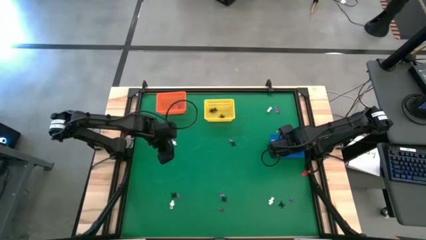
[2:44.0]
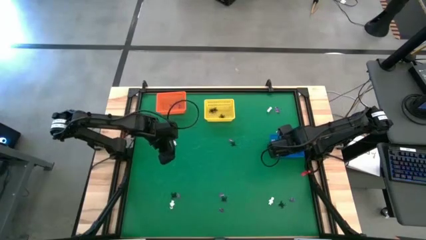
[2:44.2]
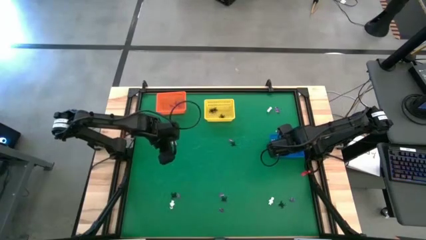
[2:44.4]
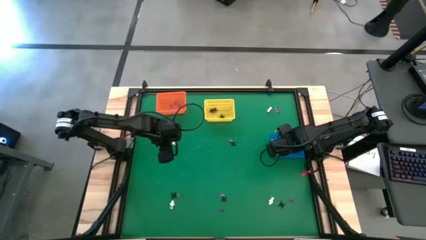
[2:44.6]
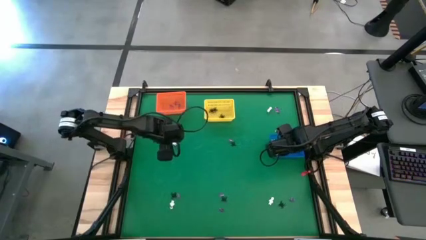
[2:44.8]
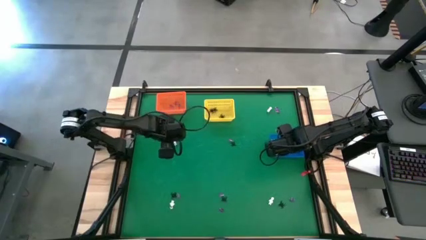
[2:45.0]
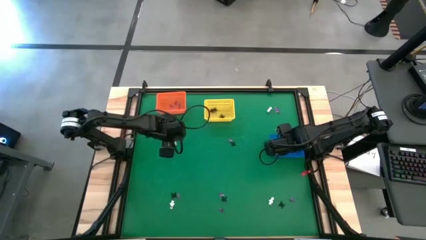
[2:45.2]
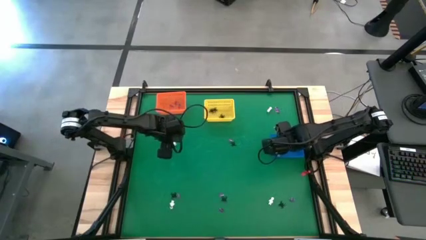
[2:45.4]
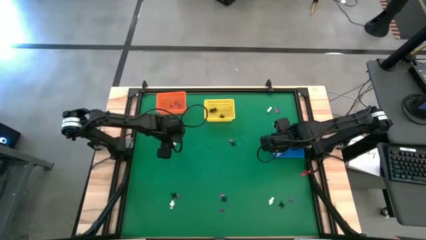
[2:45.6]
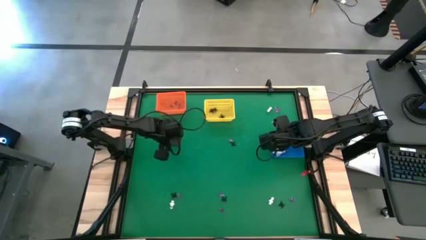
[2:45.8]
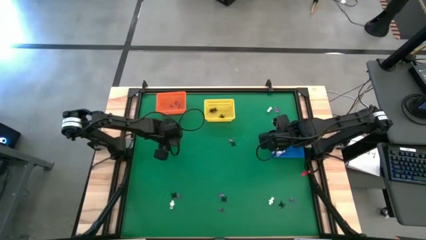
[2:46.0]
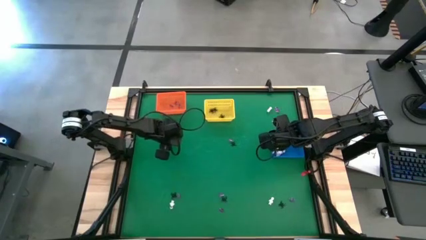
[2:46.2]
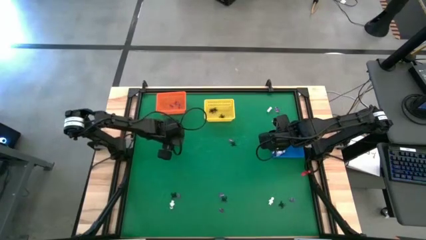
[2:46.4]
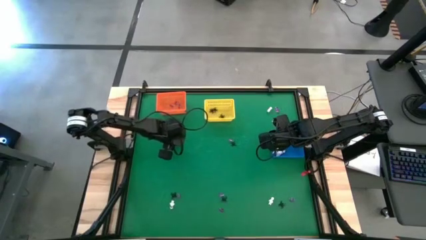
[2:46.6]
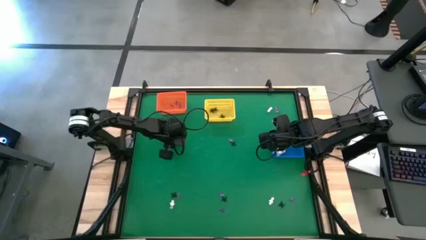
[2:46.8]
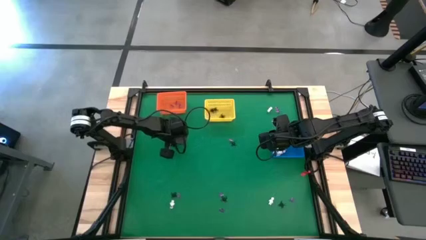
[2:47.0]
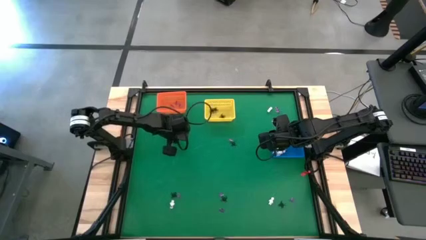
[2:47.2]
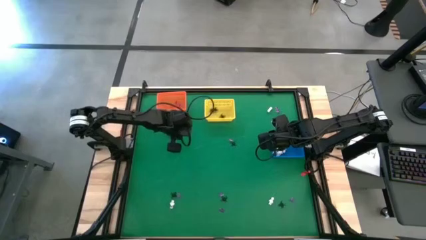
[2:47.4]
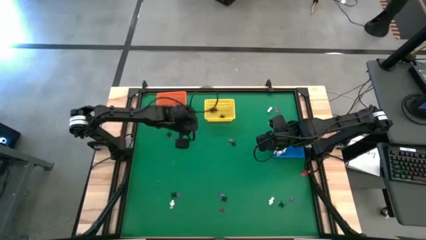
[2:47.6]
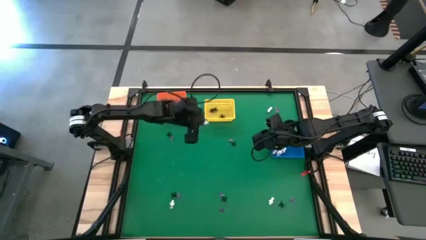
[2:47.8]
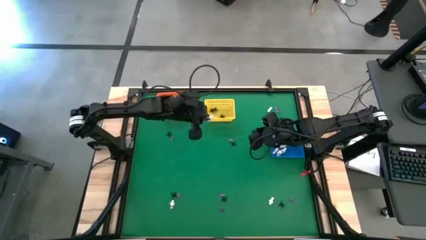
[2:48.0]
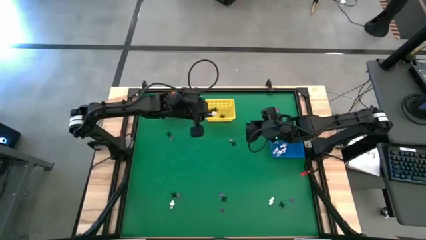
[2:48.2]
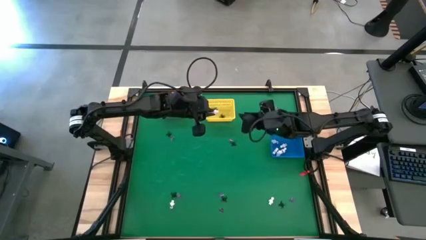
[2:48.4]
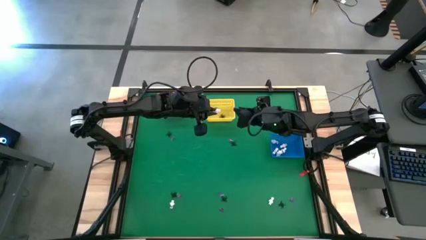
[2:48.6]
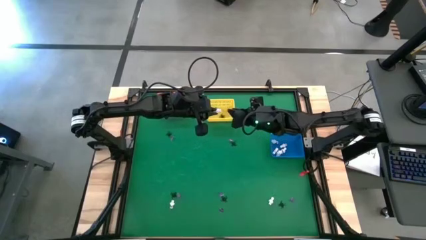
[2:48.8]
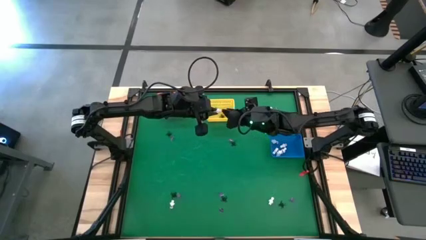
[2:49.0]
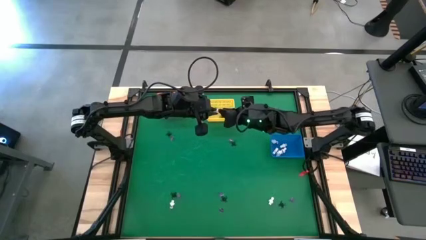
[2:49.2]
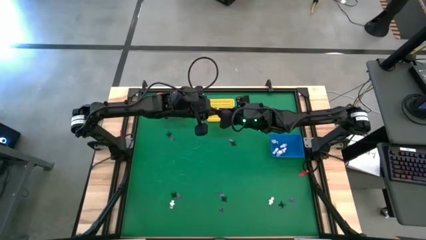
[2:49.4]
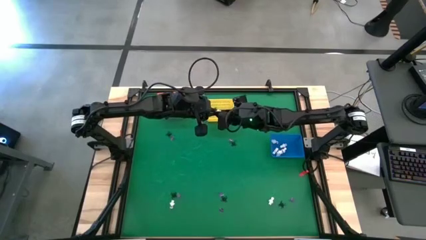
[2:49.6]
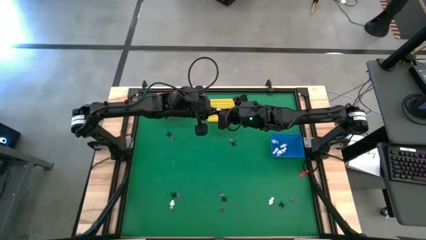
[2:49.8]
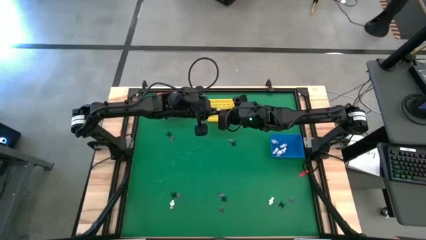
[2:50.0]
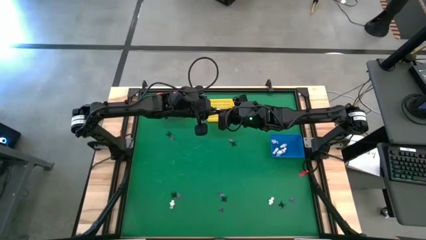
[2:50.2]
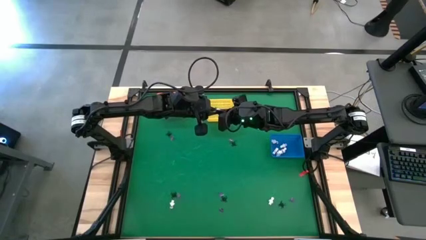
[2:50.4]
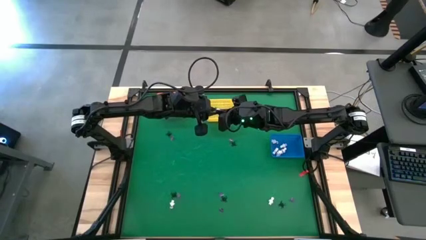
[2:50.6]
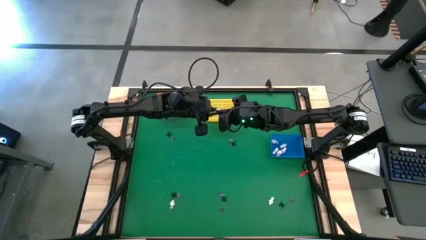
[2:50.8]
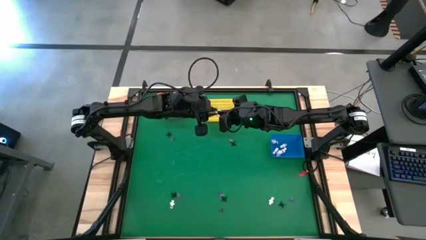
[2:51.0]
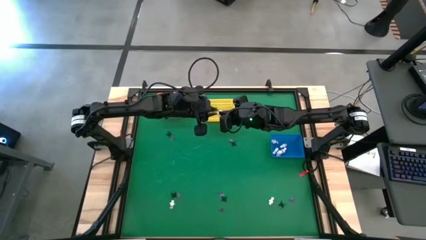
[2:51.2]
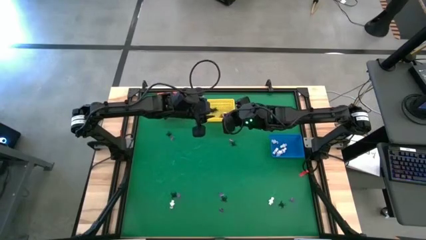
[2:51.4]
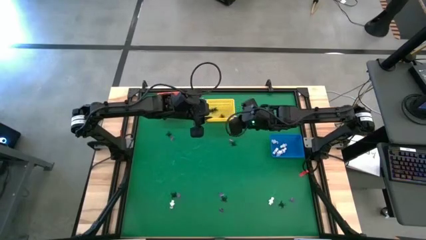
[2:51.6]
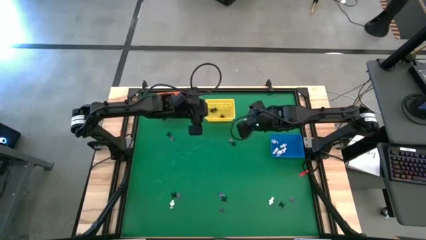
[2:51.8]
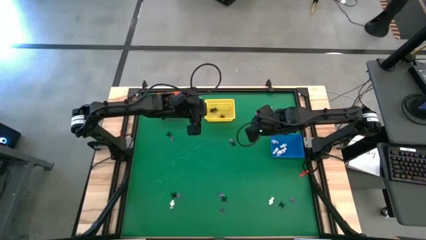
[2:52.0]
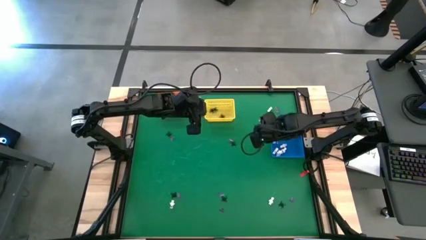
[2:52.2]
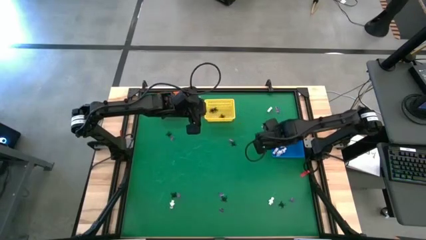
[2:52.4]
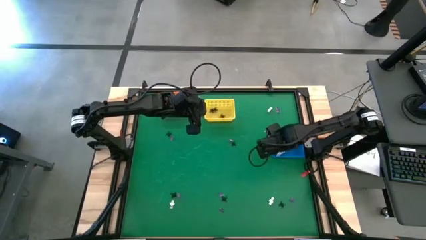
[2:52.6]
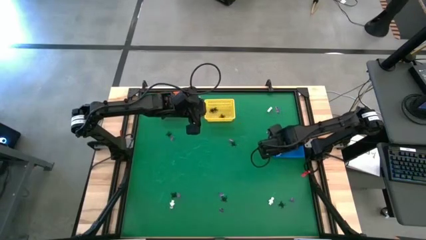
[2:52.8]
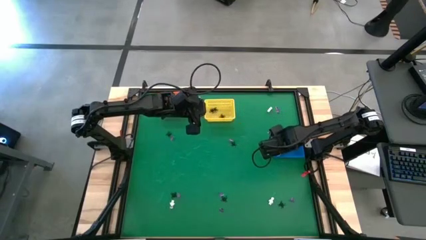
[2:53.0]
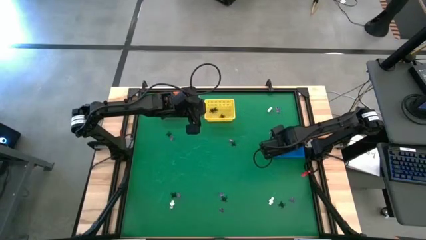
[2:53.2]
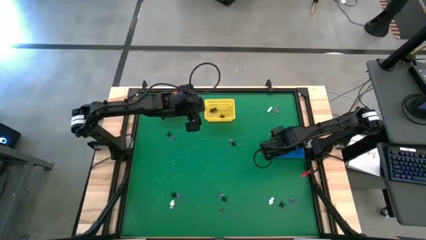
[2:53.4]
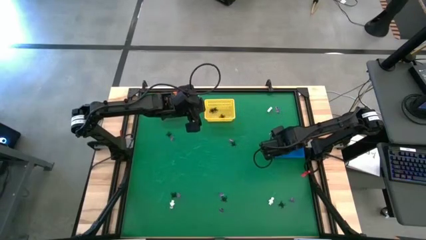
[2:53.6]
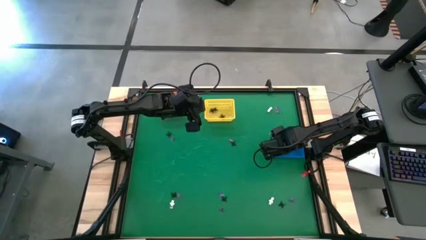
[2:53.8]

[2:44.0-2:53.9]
Task: Sort Halloween decoration
Put the white skeleton toy into the blue basket

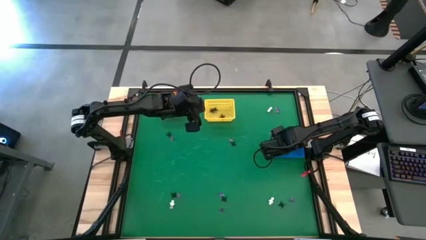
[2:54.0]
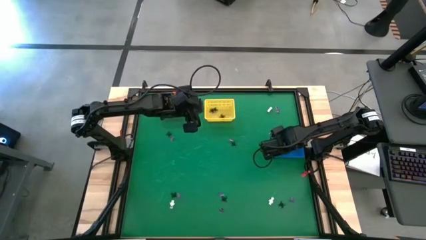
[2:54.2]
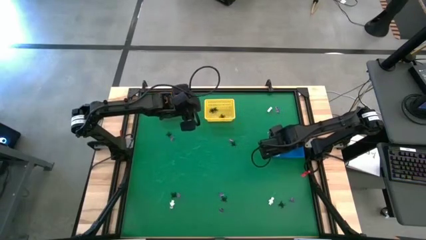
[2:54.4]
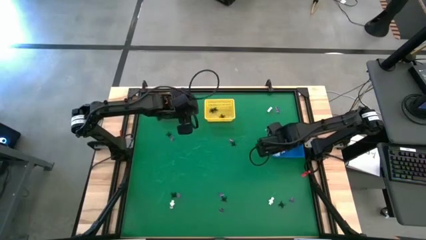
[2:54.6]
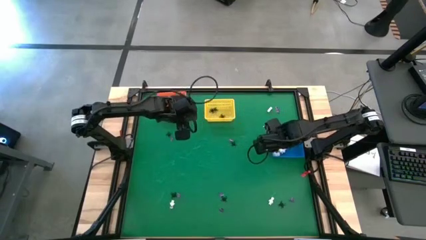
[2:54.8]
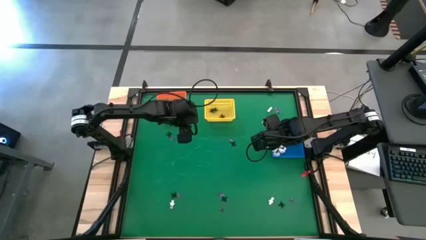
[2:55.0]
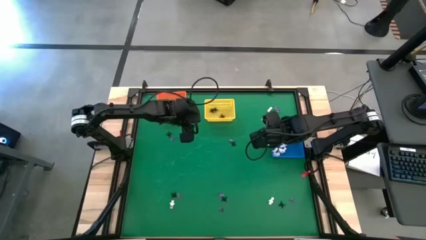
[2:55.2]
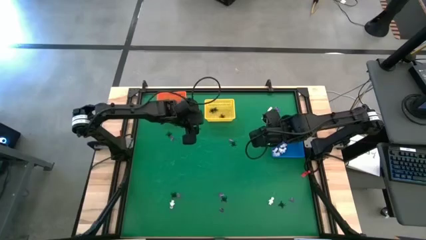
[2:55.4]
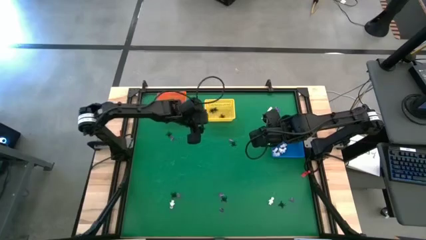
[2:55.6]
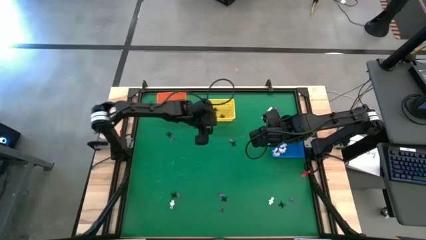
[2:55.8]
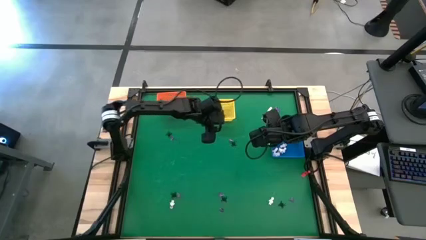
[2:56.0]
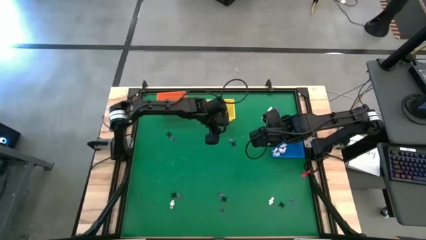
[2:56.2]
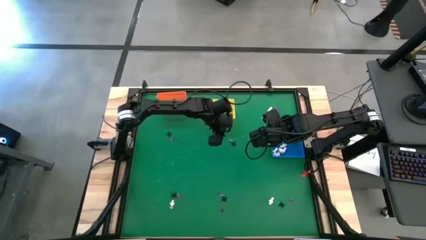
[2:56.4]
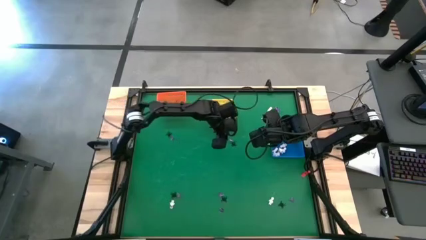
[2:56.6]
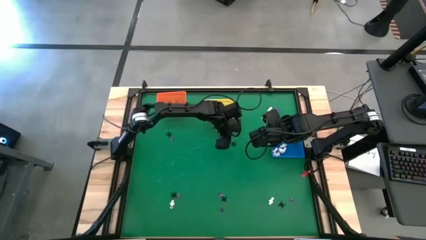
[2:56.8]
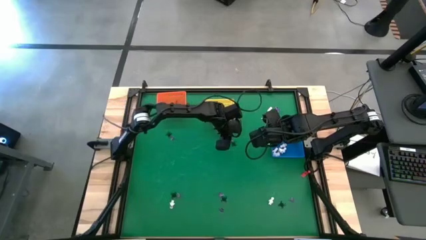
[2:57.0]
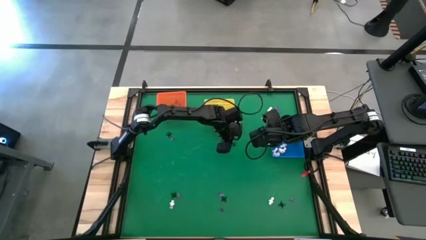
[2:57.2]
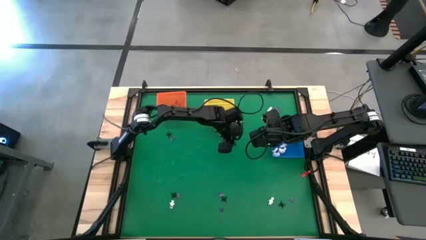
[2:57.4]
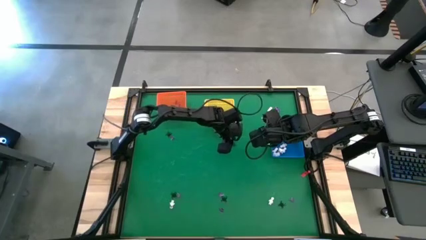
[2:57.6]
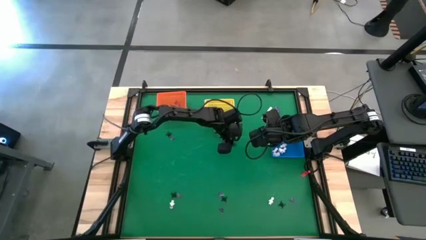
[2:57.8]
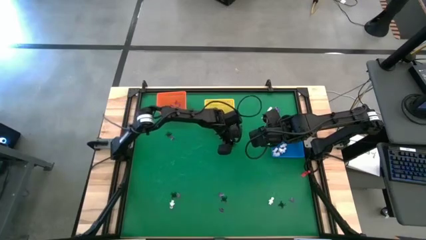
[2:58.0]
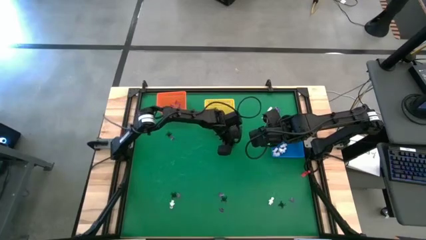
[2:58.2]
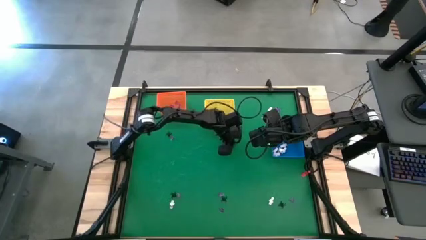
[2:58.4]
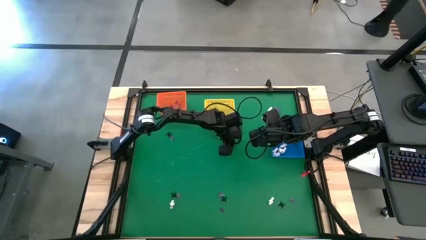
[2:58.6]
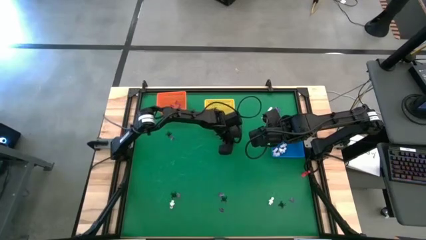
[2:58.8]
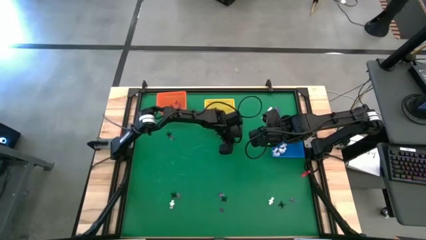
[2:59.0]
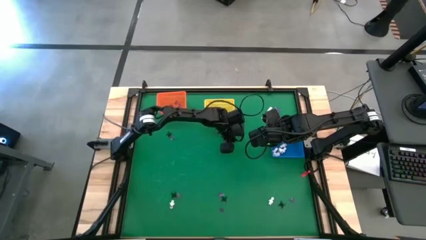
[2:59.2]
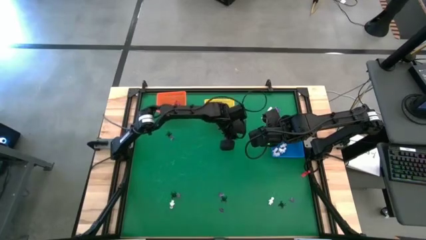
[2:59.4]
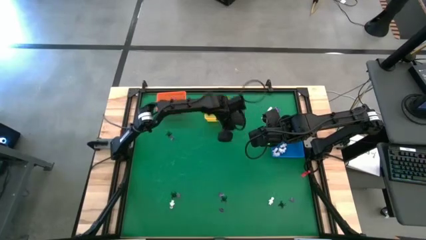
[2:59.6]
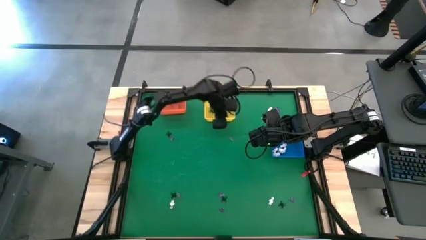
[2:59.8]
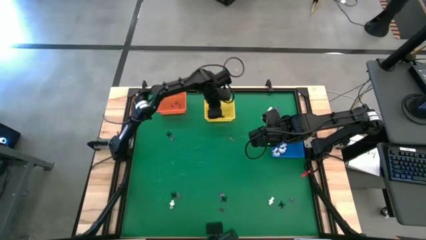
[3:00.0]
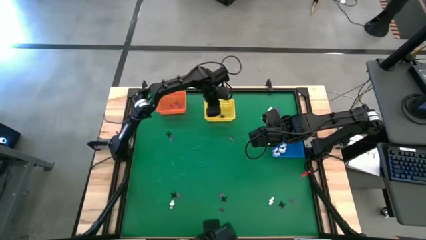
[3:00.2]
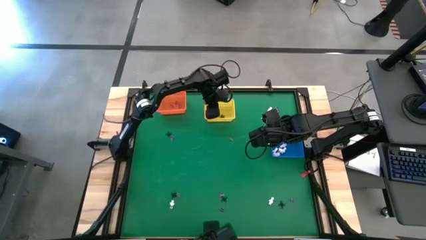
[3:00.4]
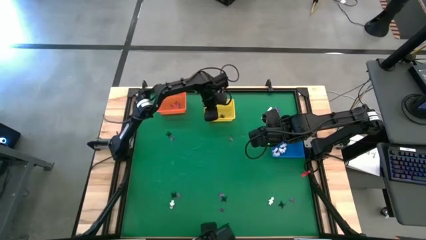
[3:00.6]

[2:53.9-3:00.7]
Put the black spider toy into the yellow basket
